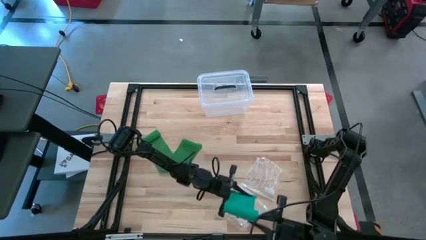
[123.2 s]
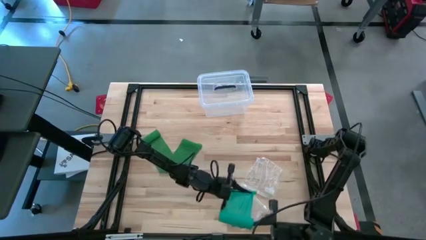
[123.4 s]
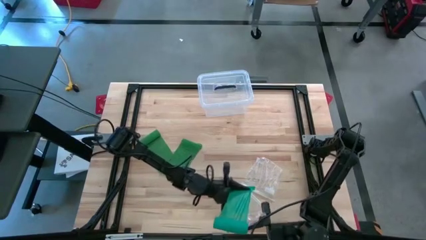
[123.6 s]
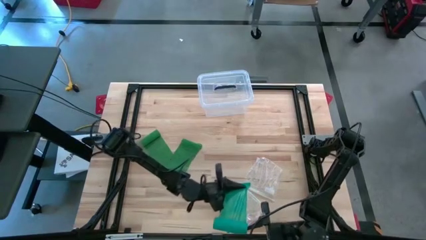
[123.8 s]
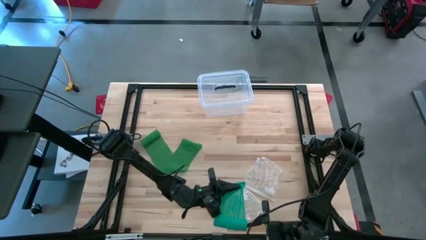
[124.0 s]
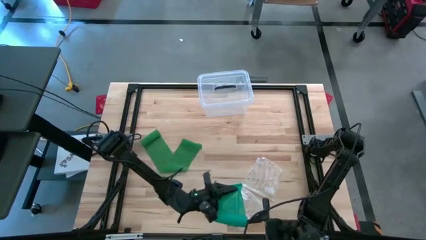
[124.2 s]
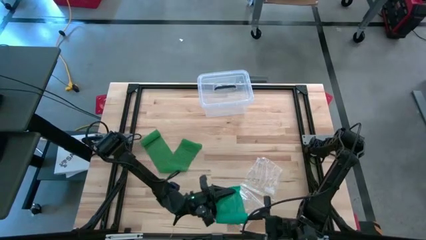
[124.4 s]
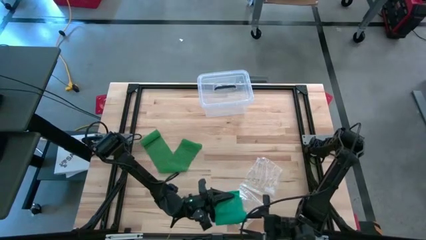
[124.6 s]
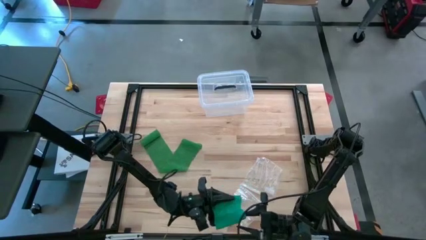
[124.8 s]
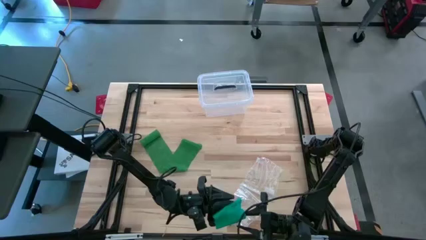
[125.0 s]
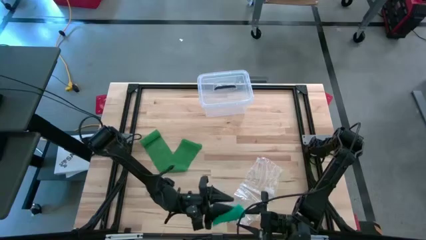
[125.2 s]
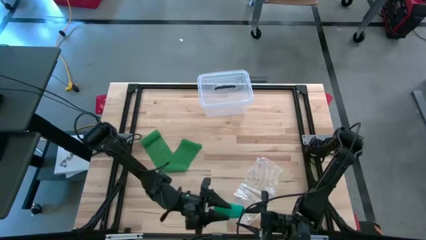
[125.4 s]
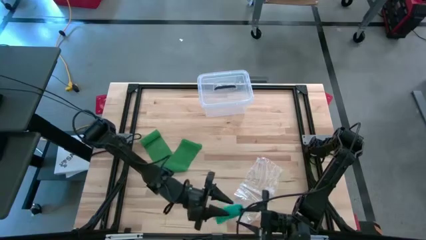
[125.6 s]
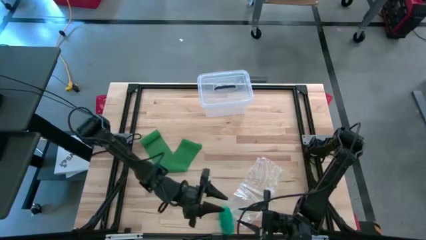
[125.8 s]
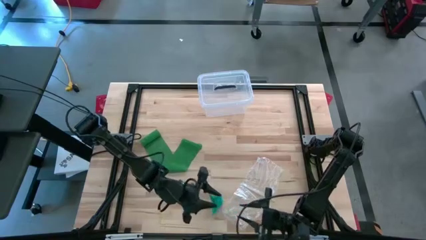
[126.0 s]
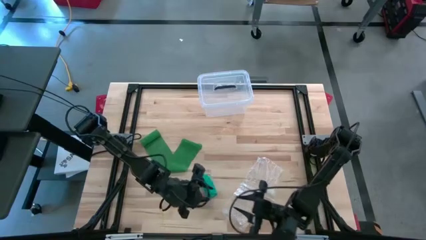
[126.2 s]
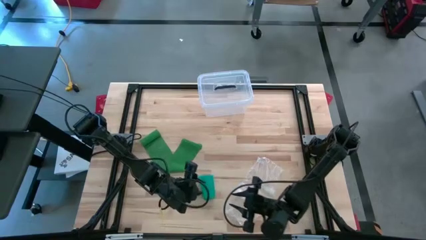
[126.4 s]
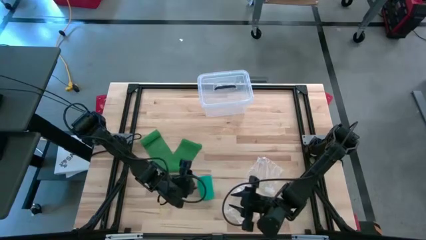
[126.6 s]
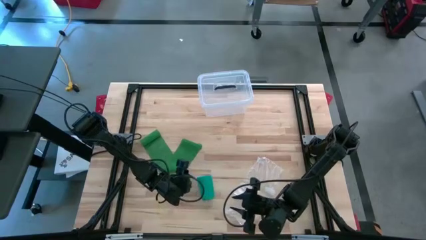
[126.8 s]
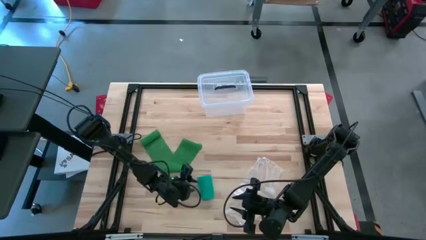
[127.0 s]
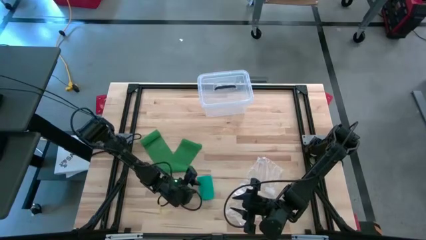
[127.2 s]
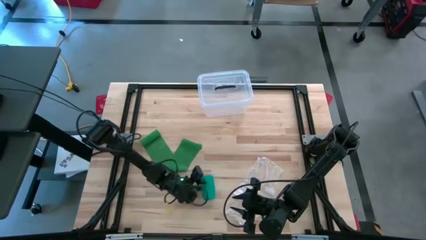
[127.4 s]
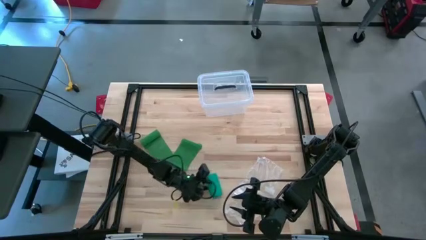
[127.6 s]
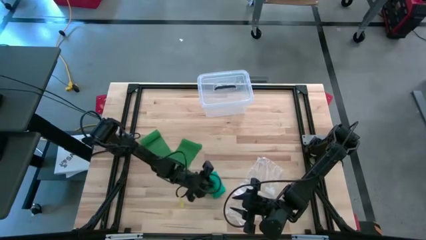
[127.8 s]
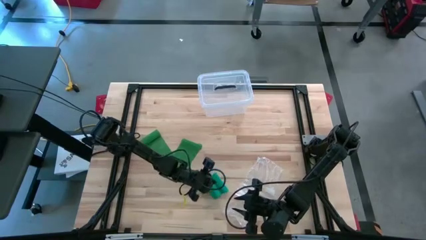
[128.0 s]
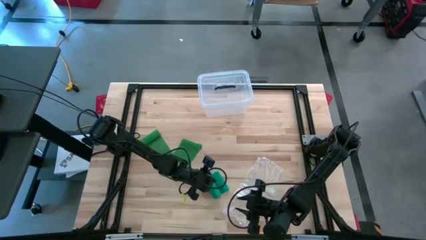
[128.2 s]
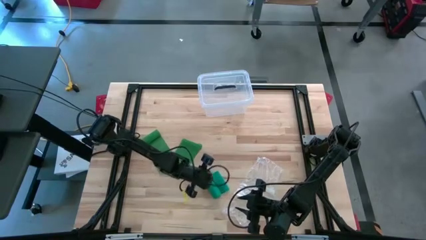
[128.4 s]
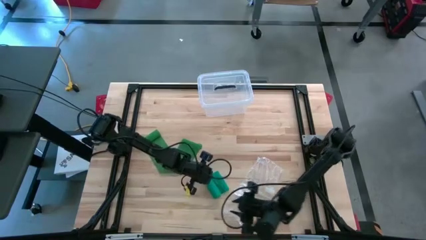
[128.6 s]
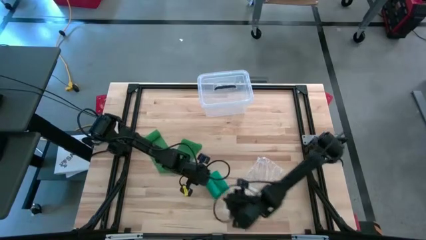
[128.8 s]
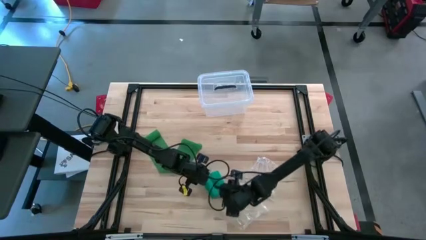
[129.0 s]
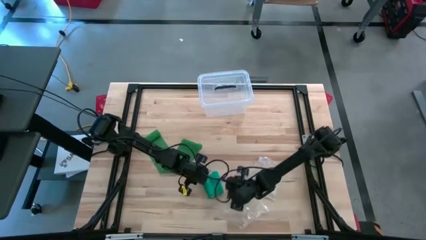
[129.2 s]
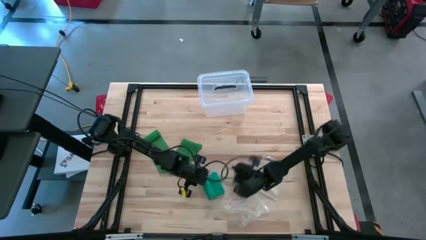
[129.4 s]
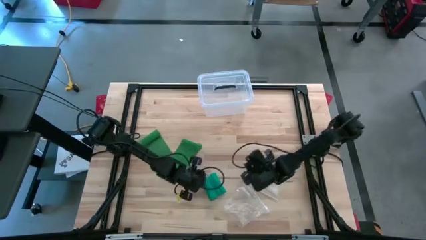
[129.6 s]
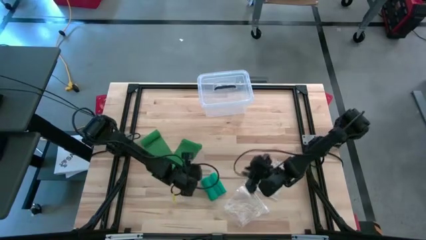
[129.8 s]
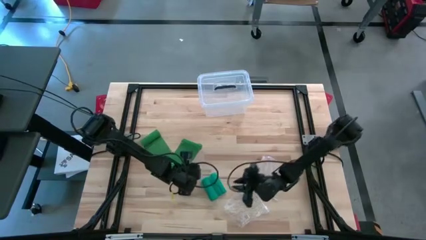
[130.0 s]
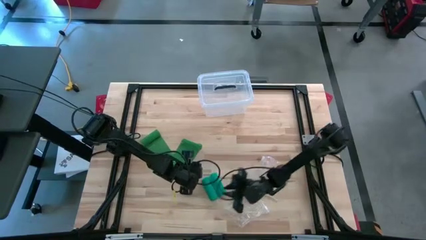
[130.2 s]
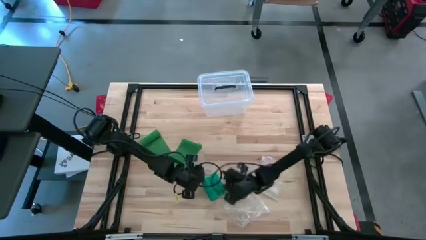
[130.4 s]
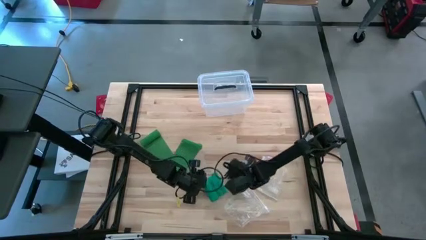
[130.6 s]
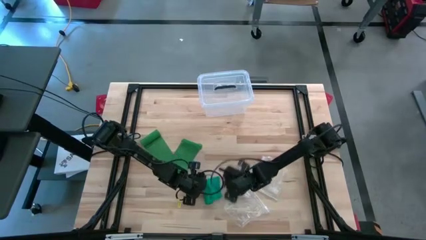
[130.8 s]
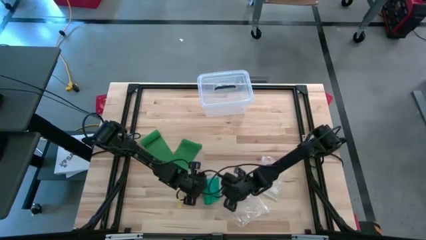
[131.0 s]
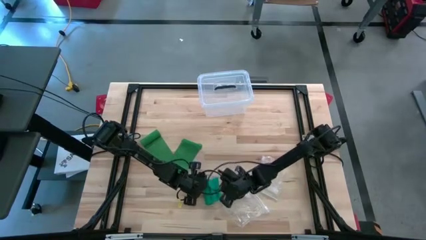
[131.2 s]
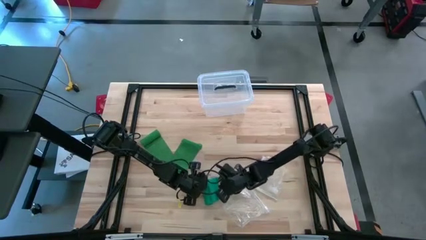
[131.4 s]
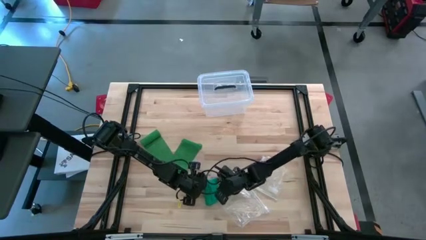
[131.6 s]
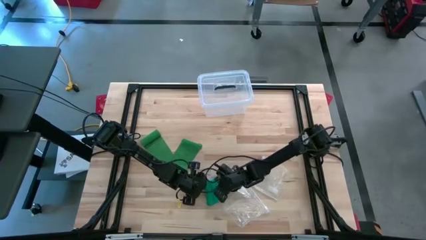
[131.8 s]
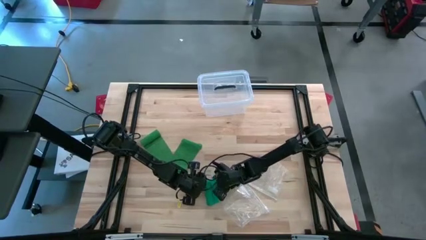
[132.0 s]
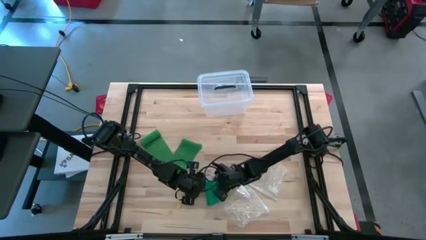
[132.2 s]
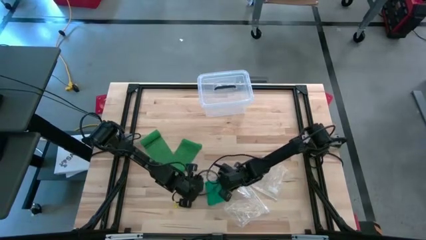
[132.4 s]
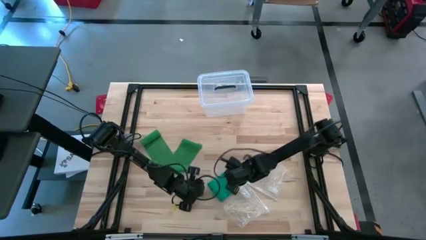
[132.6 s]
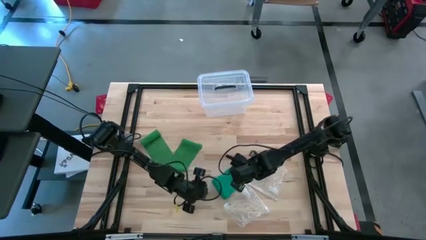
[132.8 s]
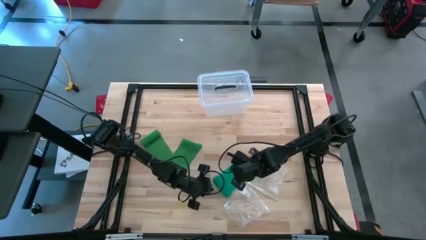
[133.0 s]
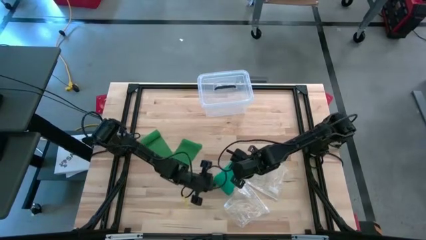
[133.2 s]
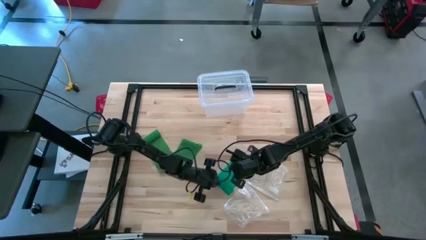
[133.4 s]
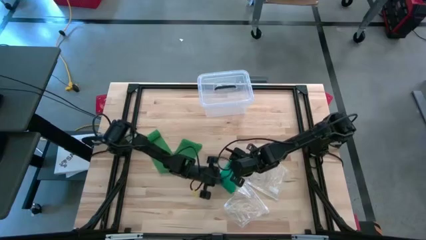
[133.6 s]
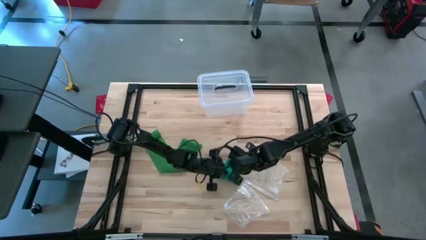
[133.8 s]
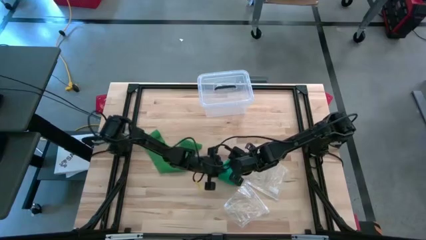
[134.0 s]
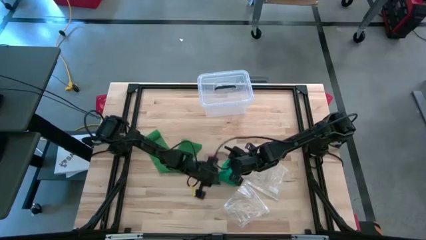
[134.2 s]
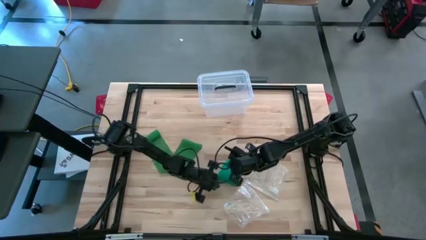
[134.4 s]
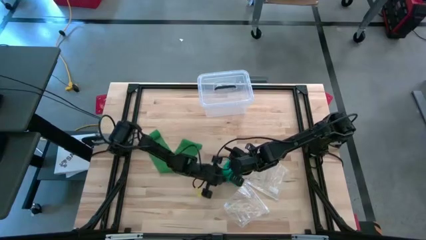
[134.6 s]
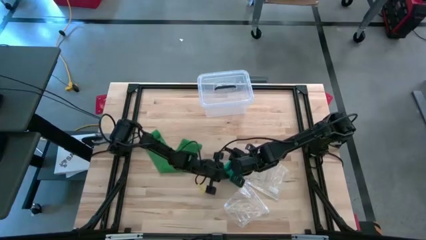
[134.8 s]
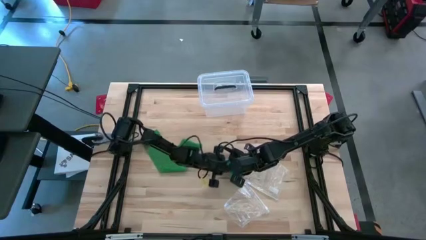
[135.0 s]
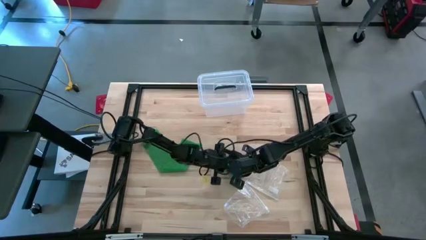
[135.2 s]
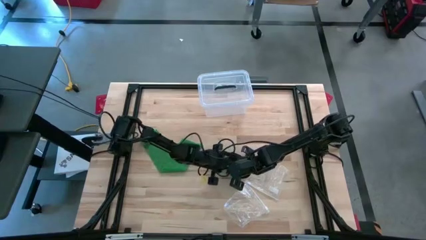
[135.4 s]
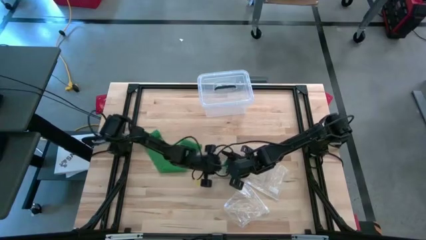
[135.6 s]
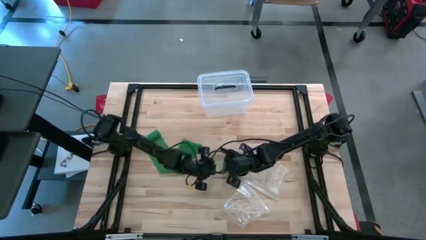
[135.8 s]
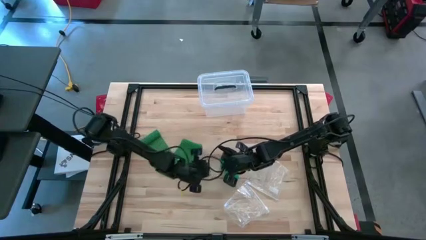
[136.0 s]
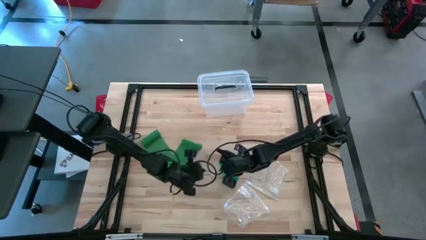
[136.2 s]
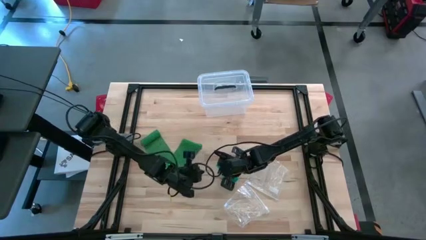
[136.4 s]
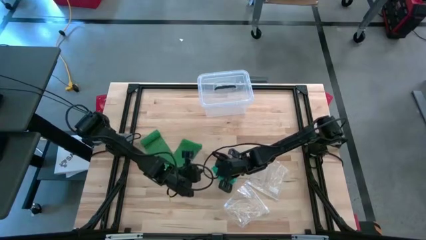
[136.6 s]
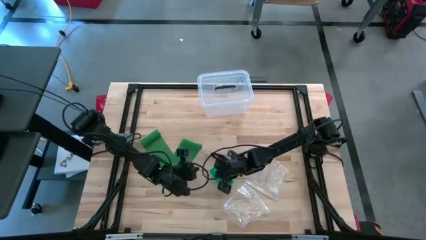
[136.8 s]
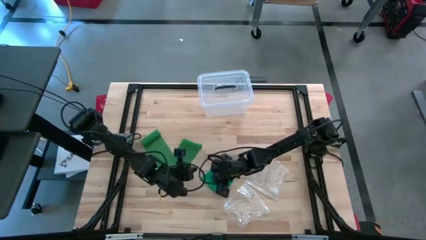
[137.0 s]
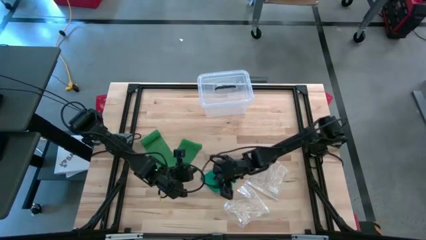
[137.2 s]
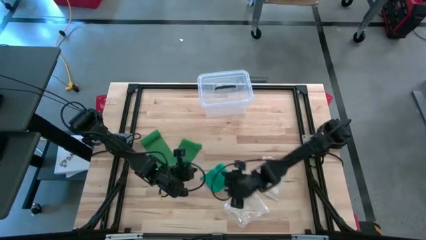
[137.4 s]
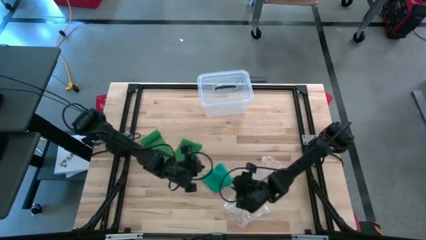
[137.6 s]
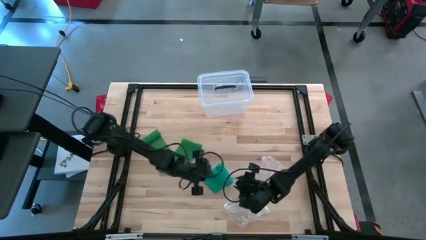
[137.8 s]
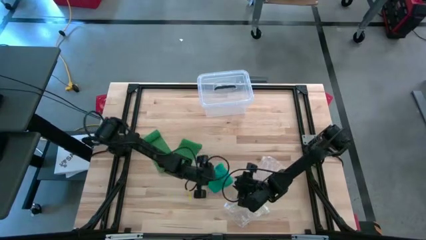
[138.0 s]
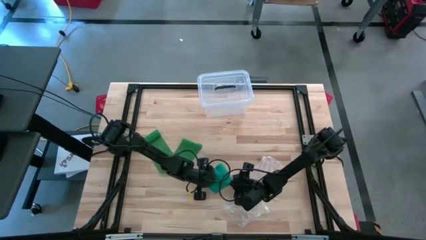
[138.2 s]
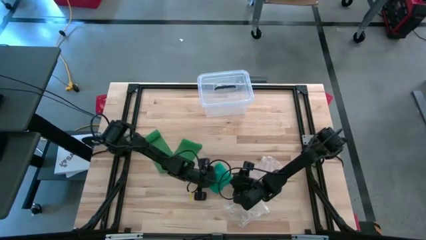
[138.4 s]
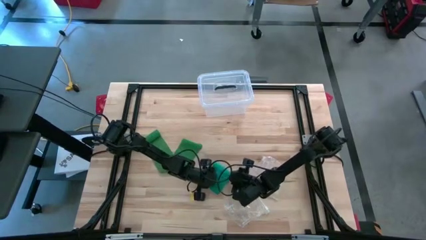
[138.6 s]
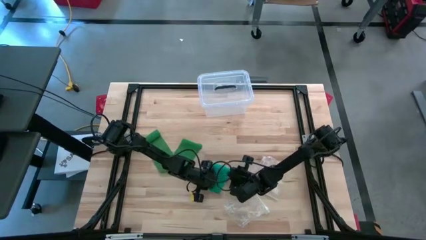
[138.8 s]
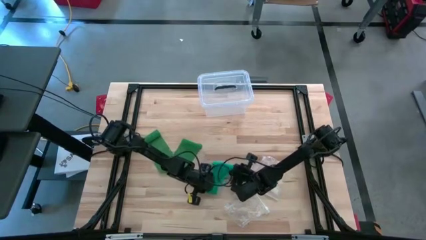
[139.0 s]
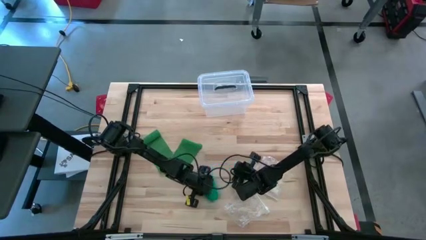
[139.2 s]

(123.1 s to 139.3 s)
Task: Roll bandage
Roll the blue bandage
